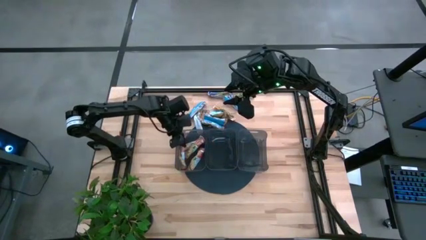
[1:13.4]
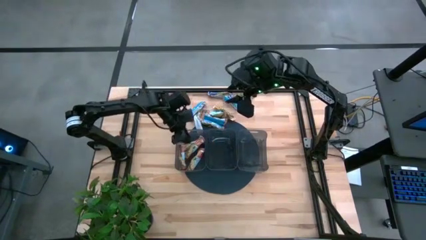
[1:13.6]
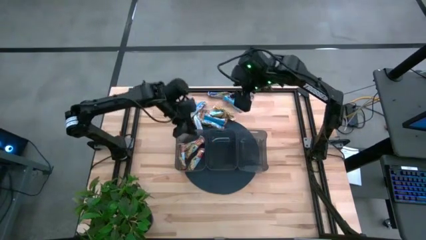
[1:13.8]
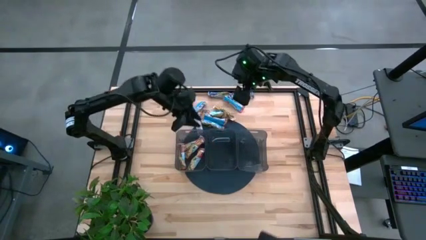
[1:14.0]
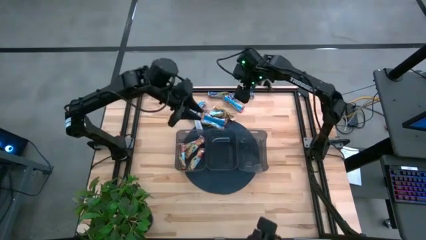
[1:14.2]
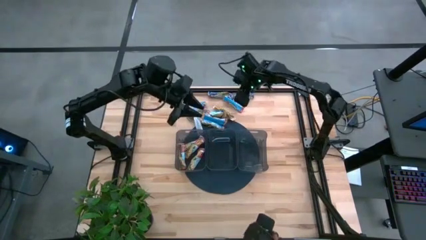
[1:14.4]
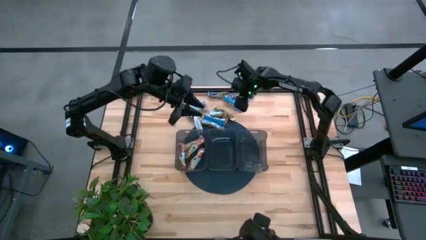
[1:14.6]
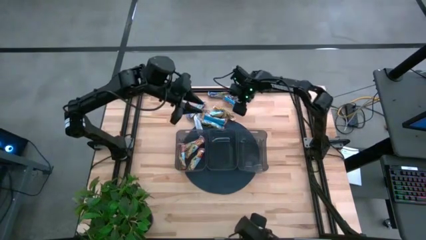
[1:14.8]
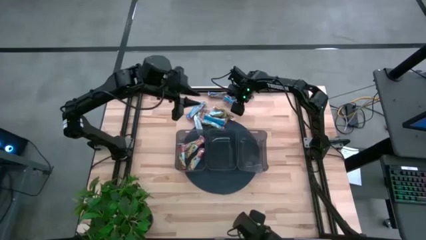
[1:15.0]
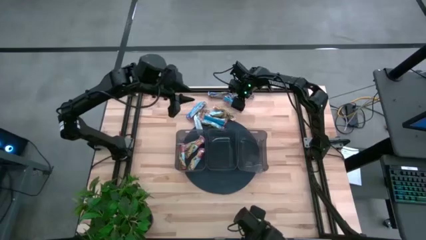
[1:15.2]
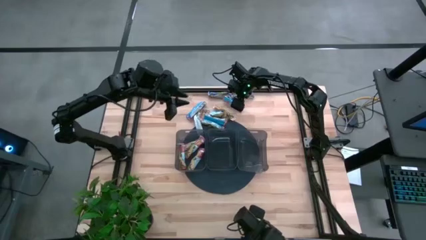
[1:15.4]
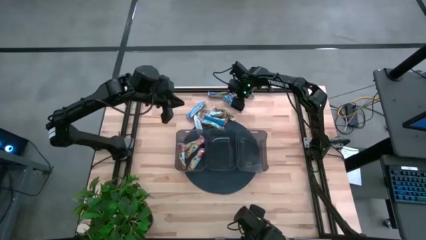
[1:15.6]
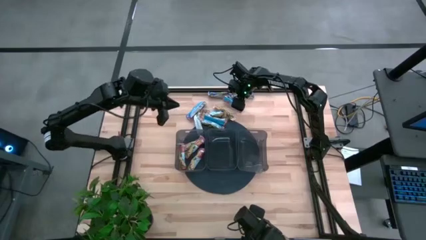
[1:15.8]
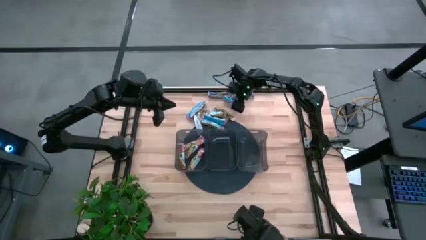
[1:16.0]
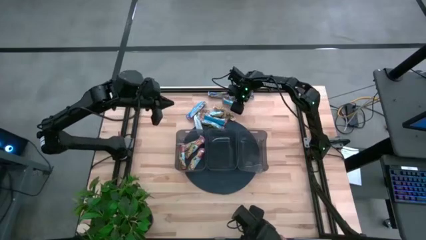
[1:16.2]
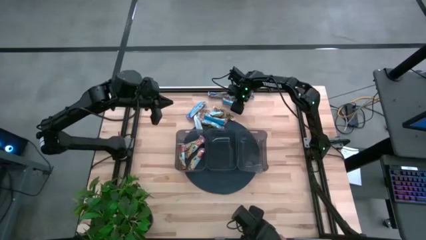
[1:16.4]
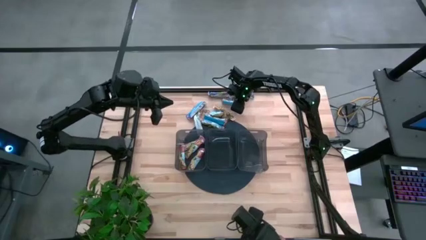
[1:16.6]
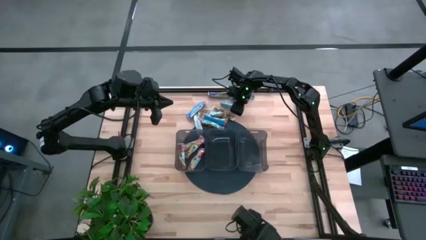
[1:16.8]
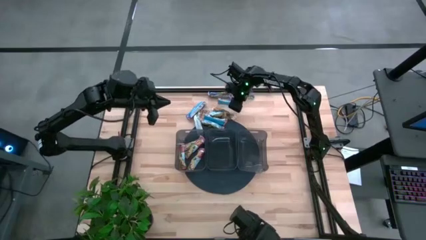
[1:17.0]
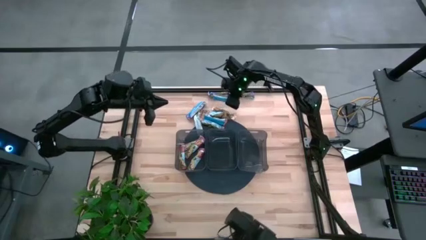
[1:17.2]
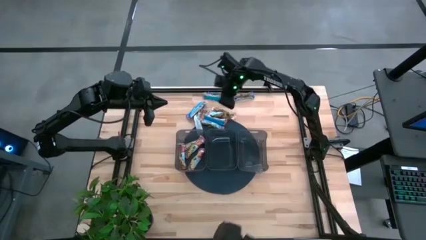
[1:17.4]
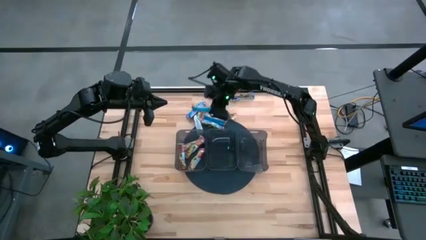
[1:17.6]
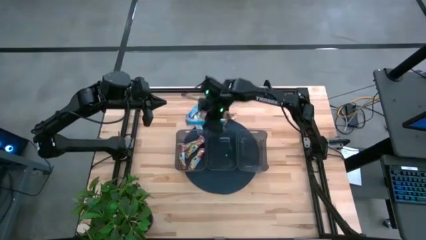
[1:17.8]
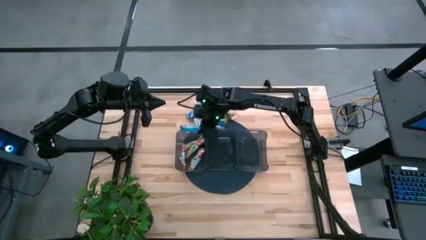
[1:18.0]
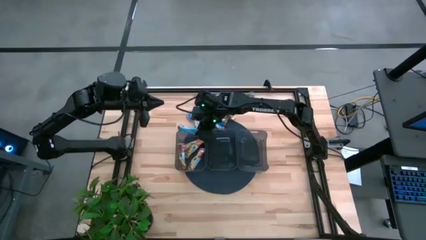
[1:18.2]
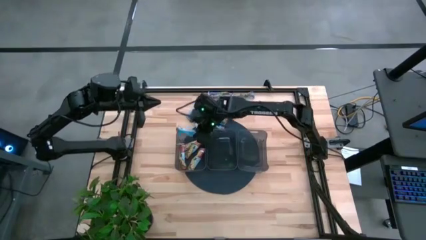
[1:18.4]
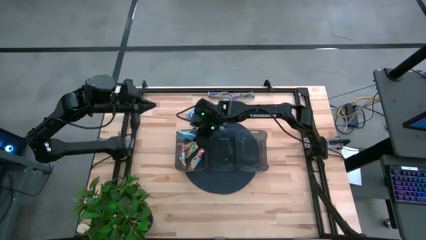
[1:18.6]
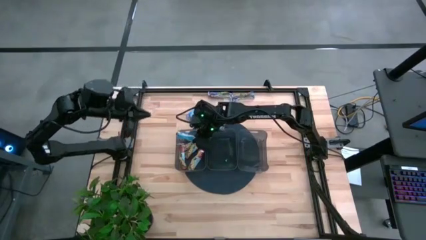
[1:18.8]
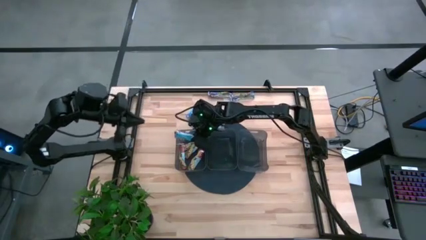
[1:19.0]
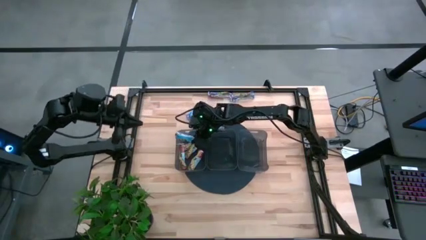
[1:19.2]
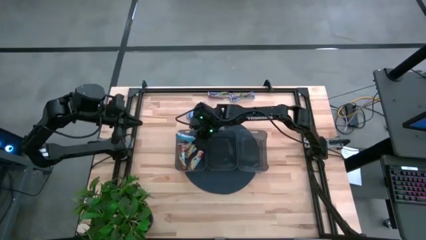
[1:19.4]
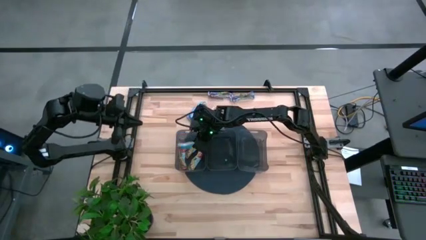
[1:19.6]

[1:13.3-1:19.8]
Task: Pick and place Granola Bars by type
Put the red granola bar into the left black bin

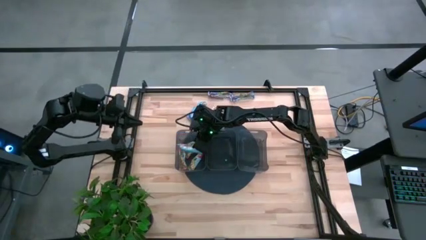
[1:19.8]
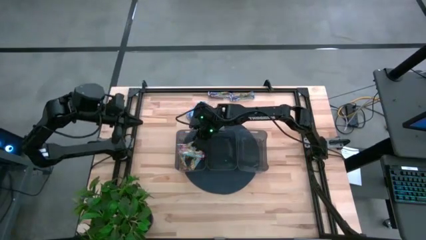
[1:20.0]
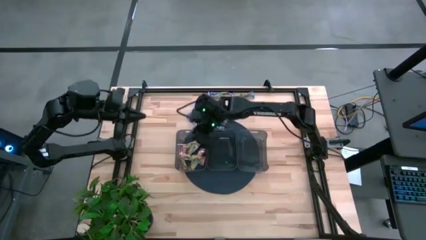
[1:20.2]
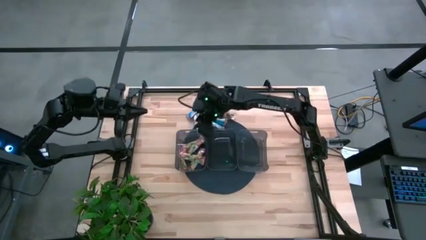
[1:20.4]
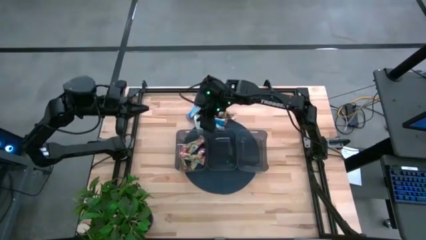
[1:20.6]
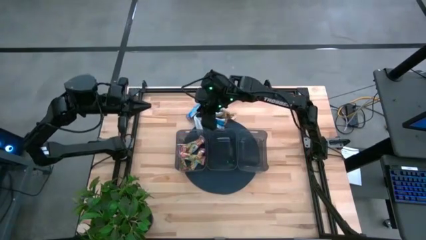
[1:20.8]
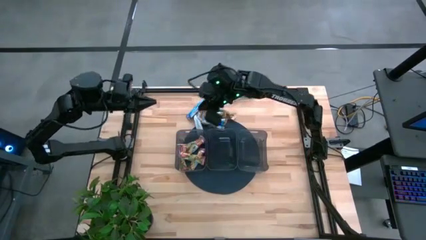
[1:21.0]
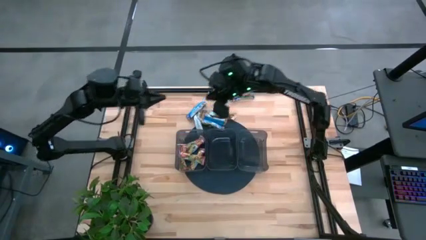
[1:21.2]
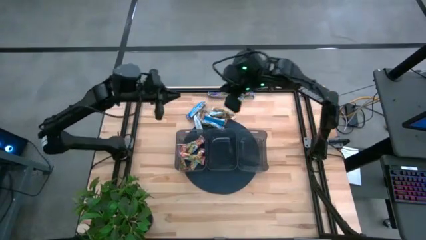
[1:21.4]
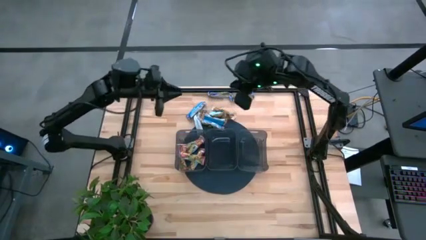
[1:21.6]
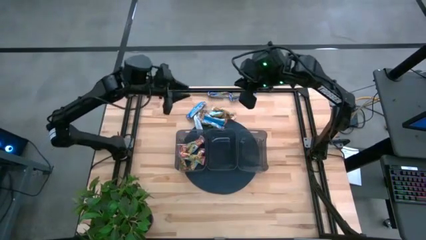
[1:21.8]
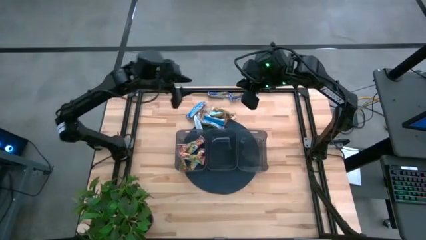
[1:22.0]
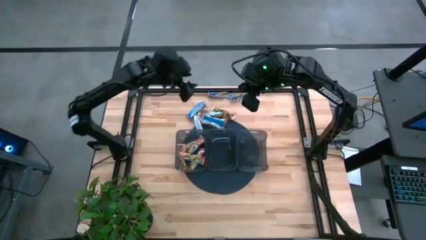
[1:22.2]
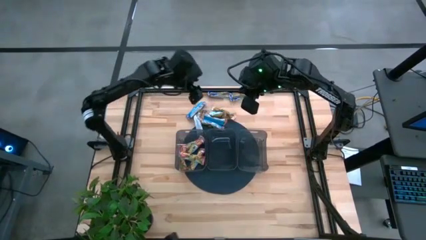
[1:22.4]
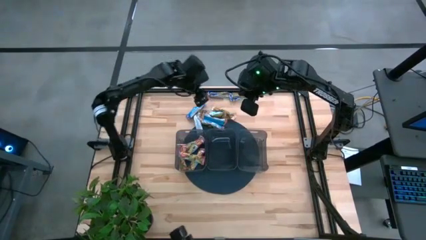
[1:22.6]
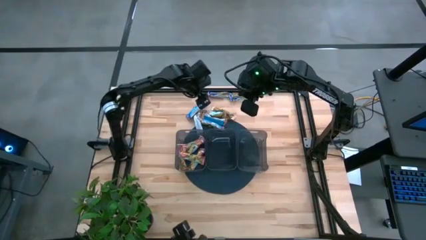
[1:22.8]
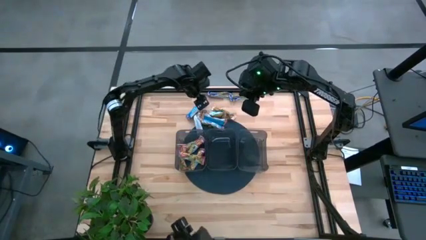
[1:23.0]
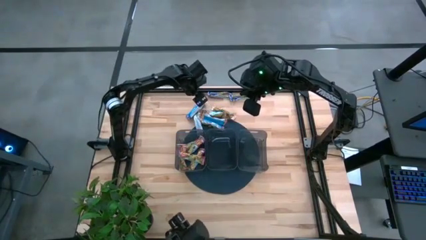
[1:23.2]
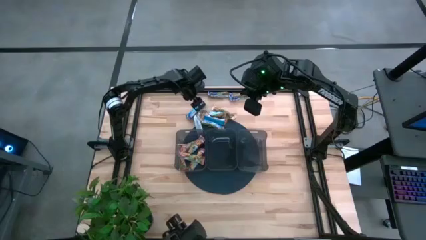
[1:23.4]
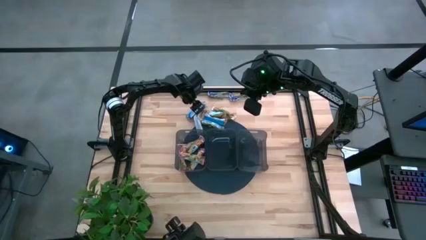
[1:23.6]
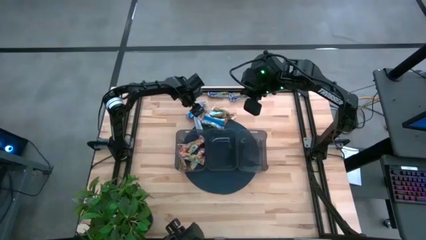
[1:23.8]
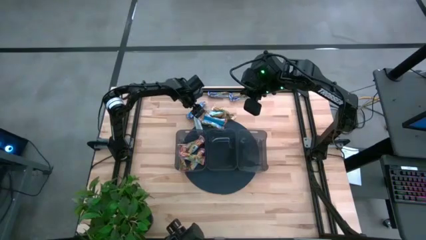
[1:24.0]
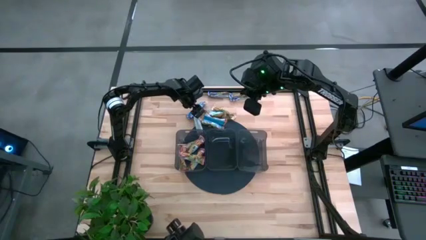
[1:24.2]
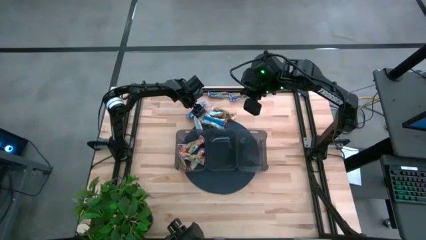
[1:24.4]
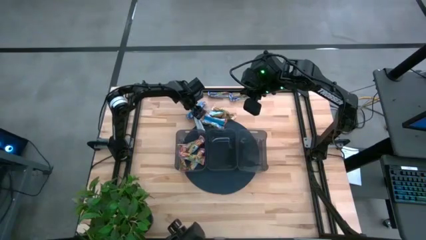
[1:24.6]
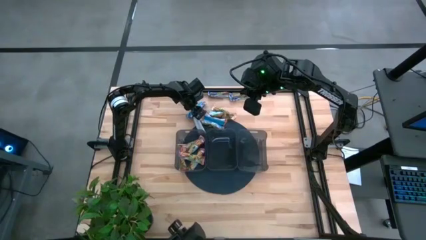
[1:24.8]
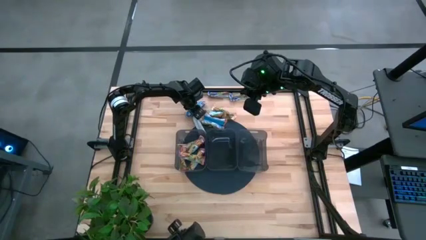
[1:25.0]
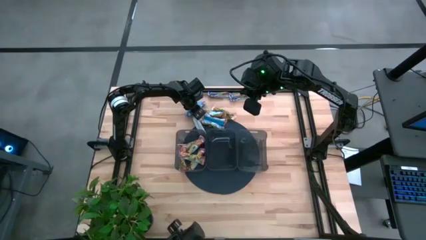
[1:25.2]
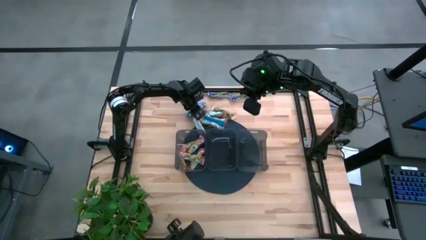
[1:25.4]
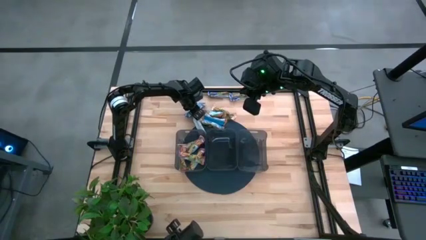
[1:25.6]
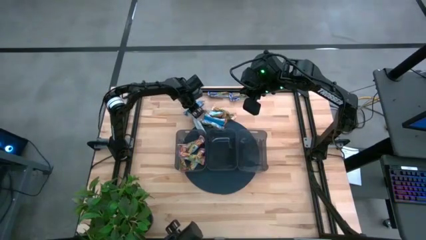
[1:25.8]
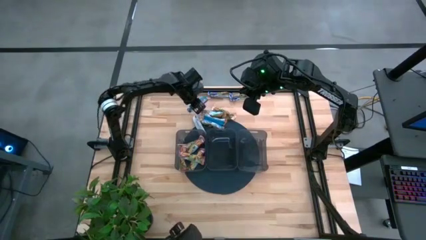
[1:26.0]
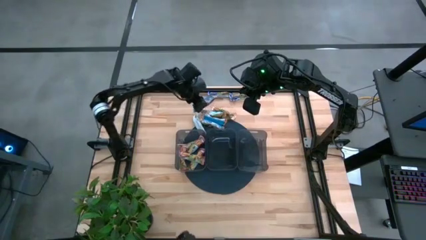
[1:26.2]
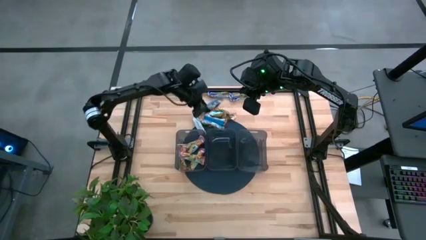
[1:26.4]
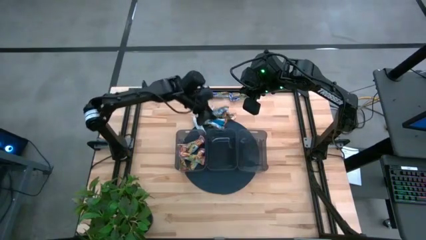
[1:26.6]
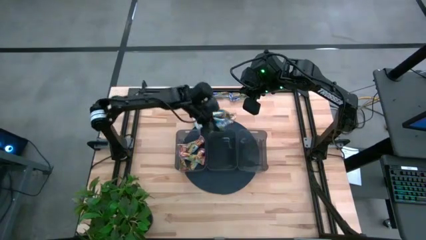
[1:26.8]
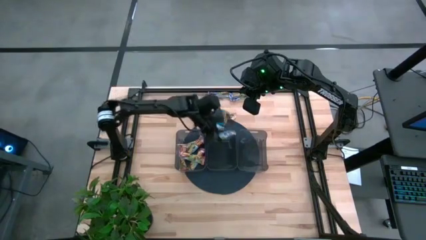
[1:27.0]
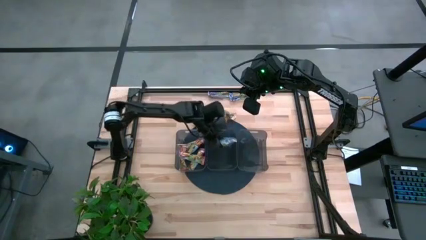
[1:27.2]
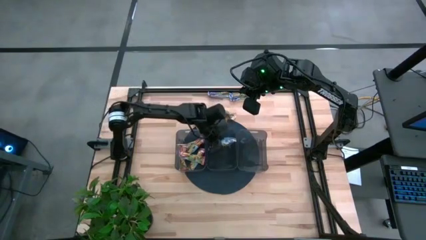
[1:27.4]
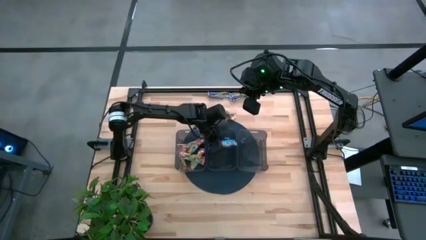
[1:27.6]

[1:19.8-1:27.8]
Put the blue granola bar into the middle black bin
